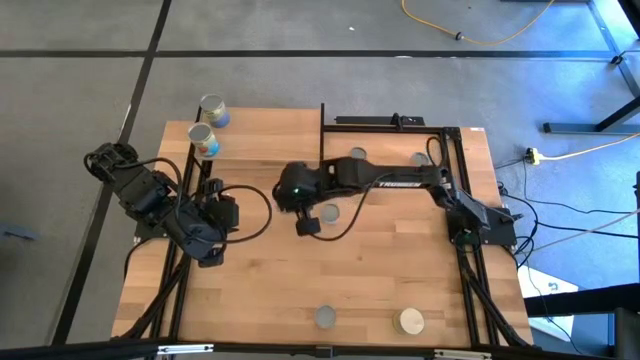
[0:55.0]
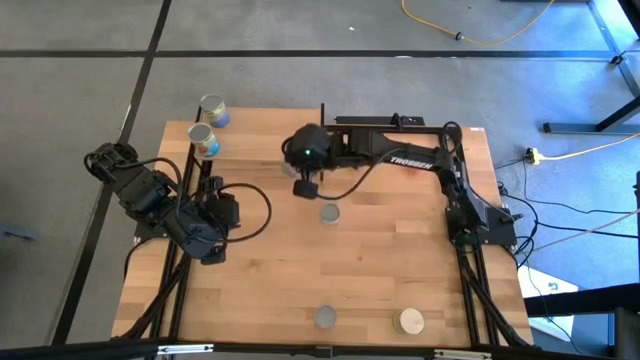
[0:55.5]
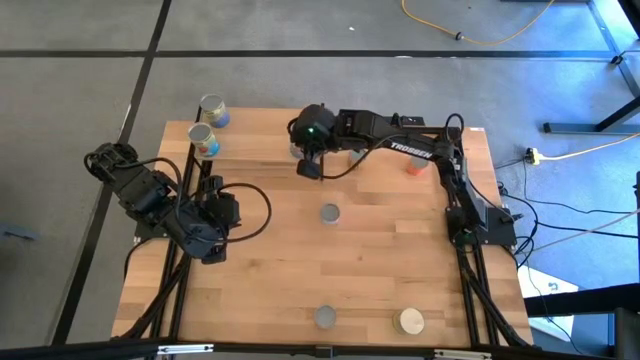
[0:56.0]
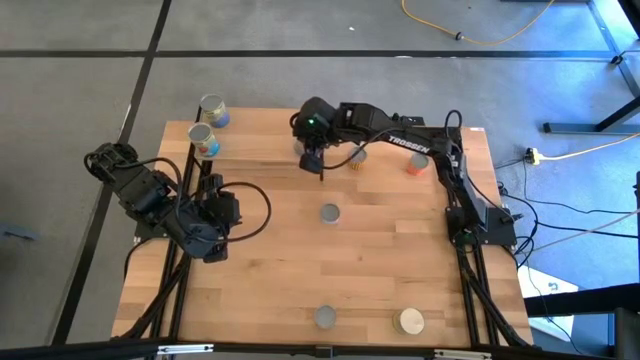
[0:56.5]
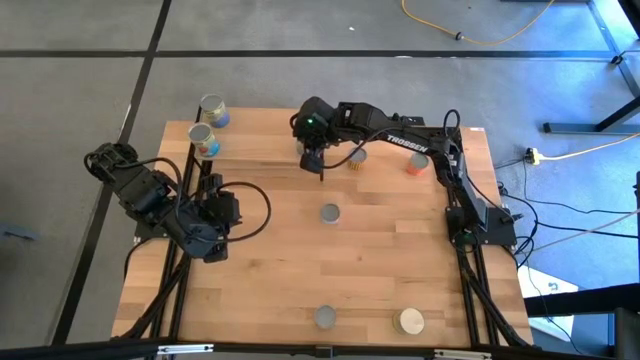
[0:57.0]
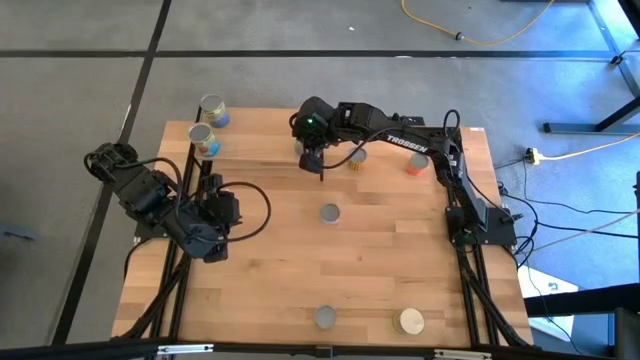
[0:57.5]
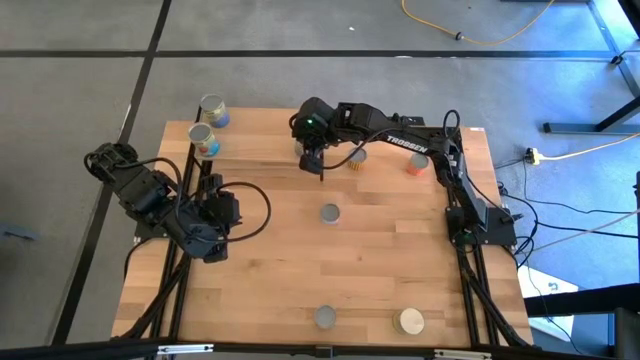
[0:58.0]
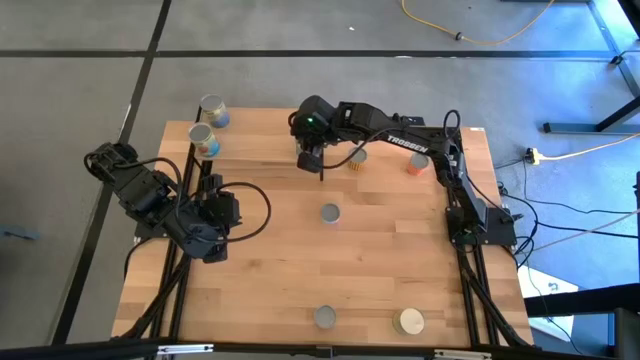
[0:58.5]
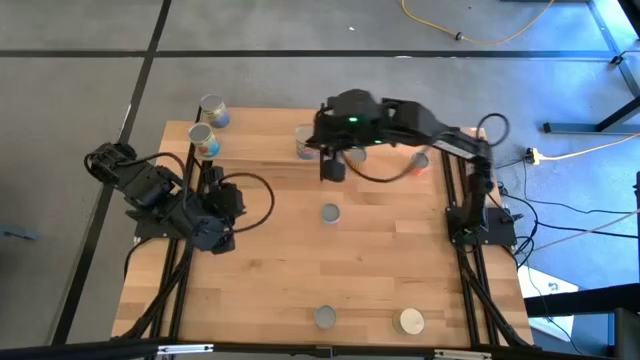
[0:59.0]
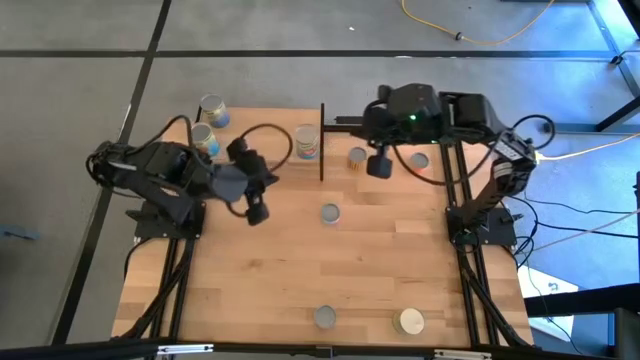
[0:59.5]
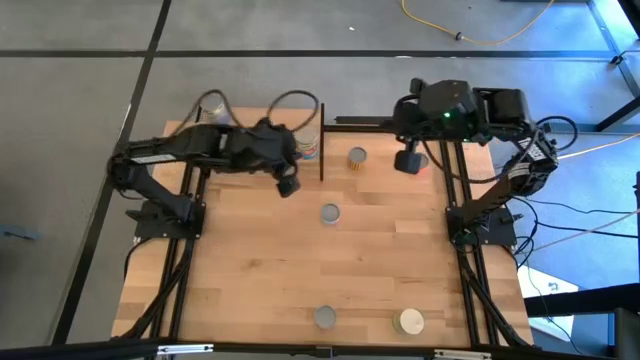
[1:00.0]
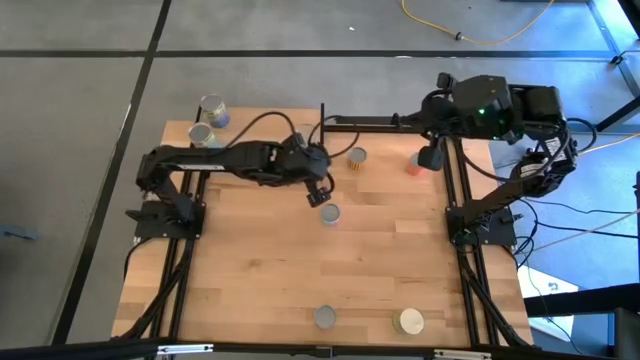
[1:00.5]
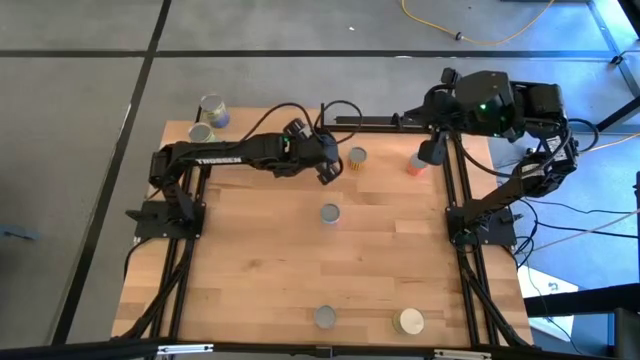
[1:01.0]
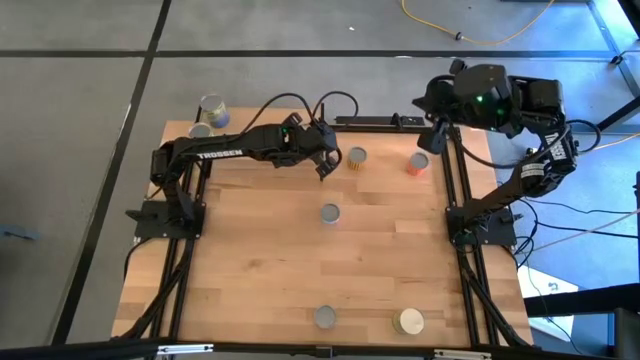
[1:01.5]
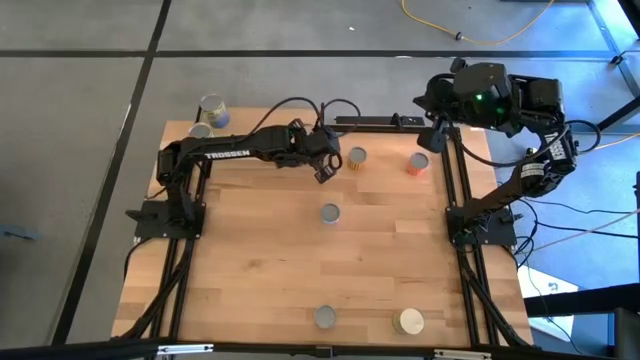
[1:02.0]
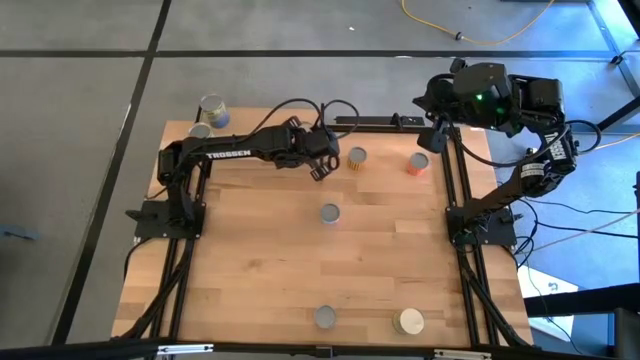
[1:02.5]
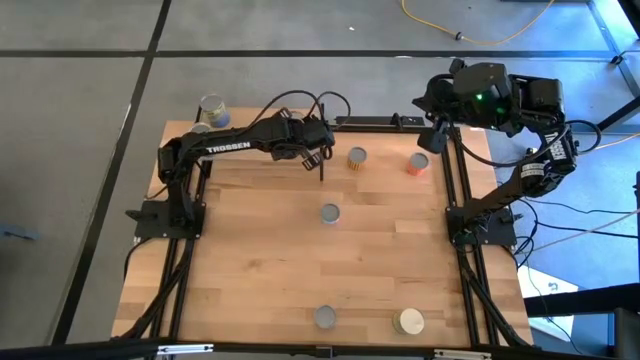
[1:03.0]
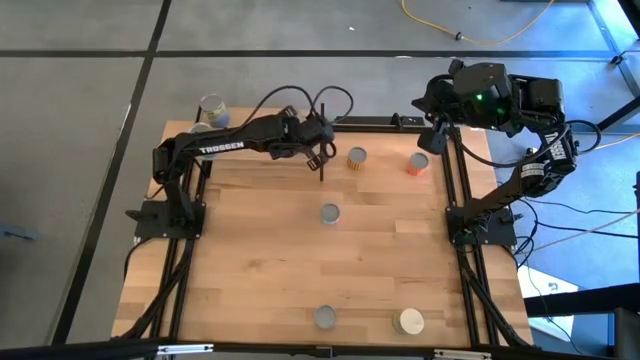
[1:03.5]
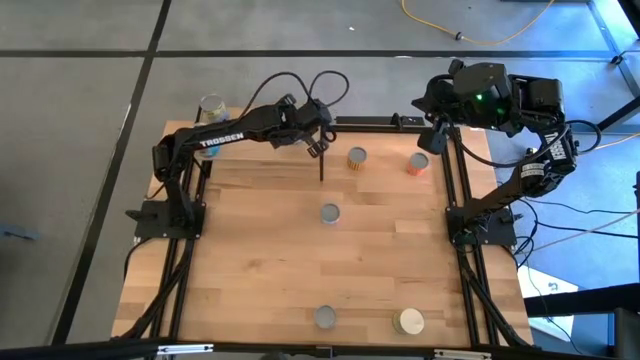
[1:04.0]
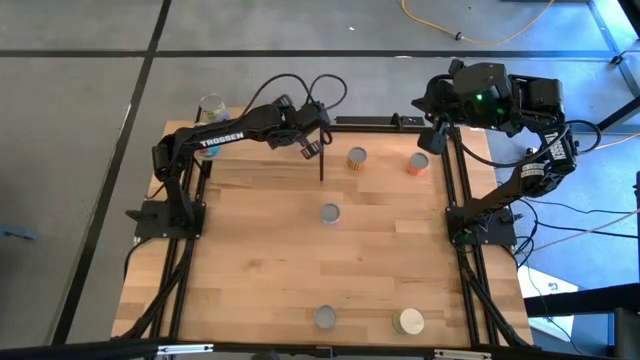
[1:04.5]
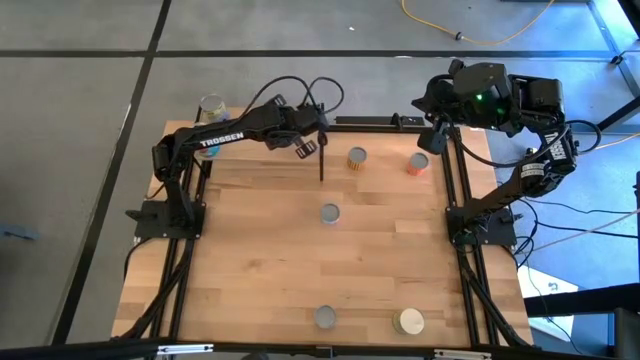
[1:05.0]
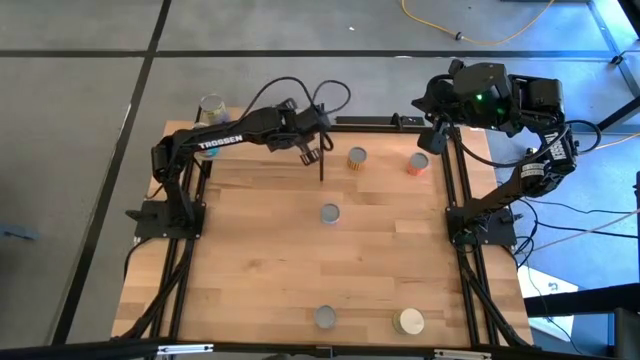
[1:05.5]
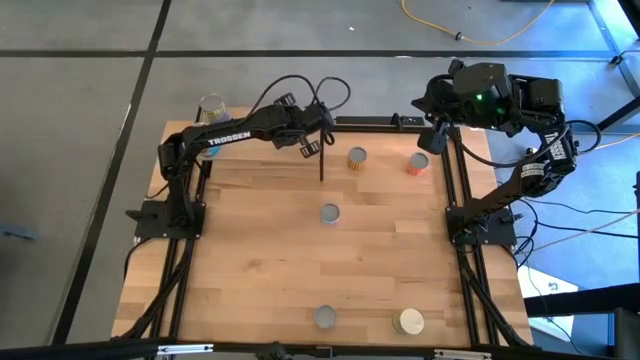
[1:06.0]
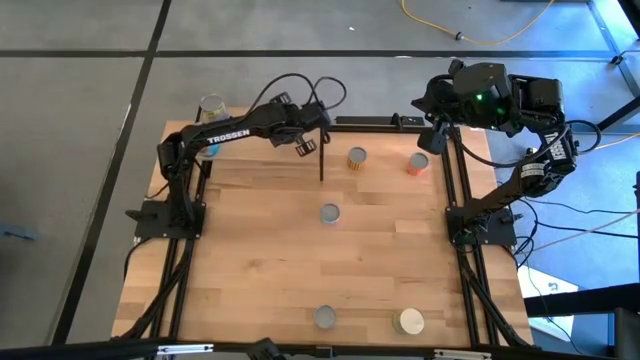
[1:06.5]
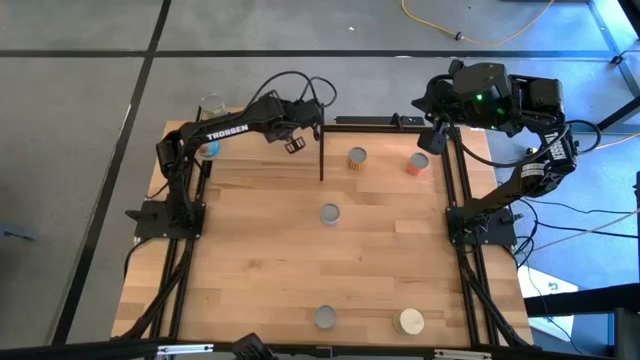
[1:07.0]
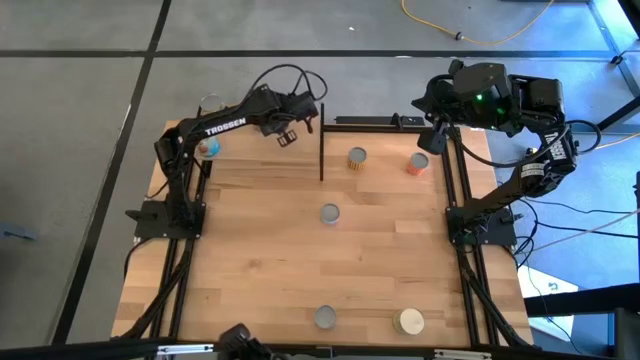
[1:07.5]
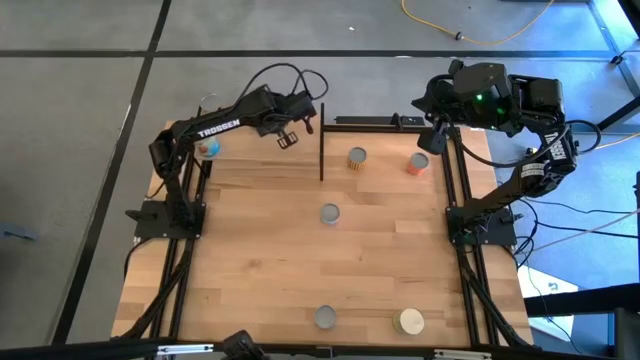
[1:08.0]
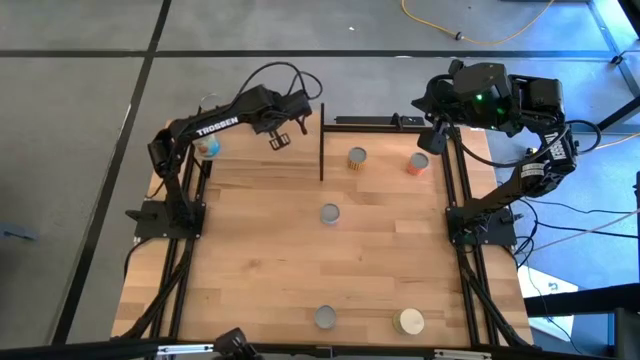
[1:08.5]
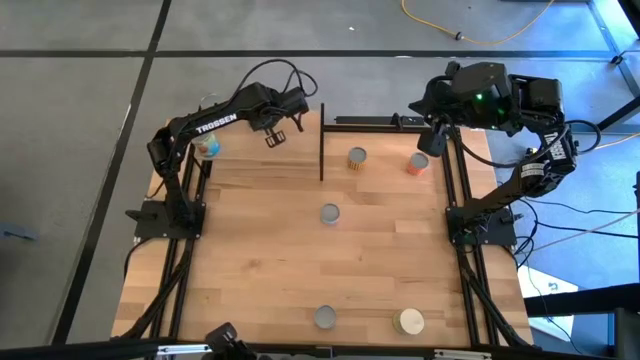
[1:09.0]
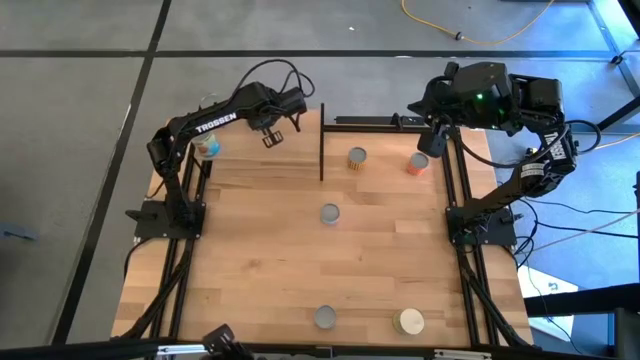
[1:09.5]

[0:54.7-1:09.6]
Task: Pick and place cans onto a shelf
Put the blue canned tomatoes on the shelf

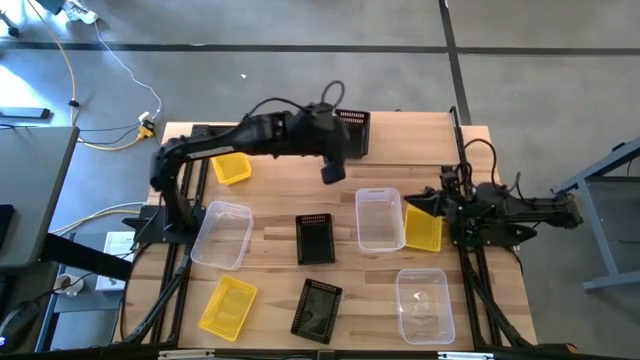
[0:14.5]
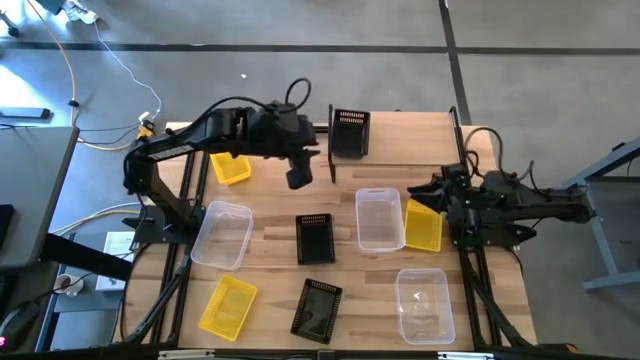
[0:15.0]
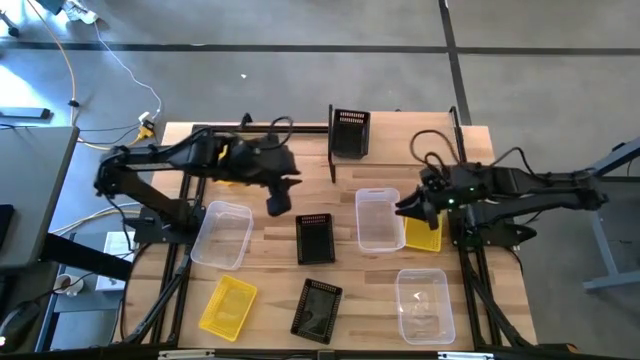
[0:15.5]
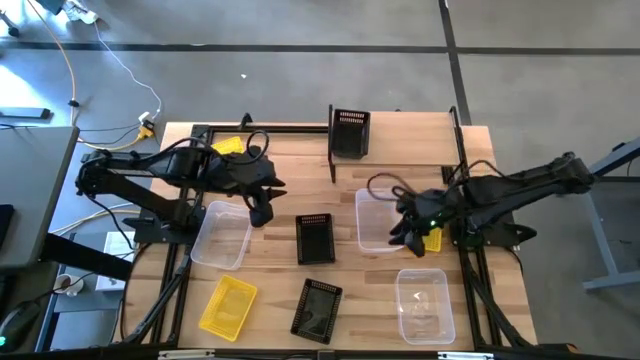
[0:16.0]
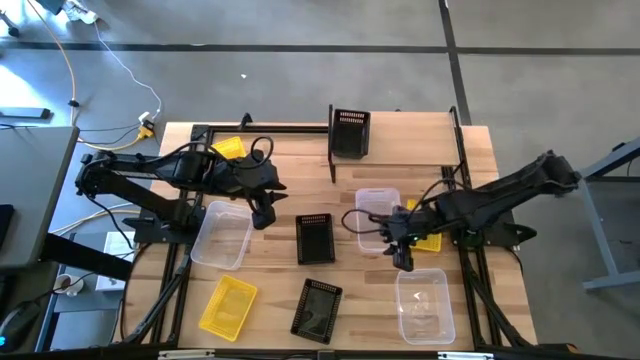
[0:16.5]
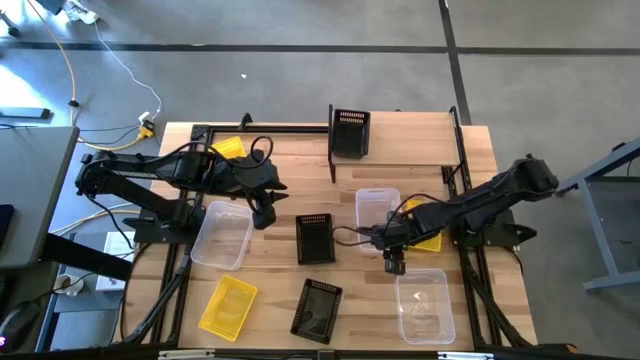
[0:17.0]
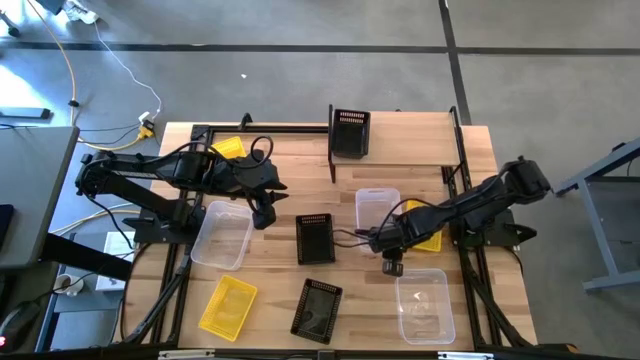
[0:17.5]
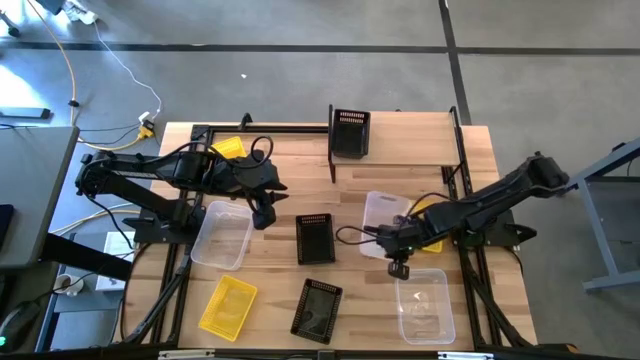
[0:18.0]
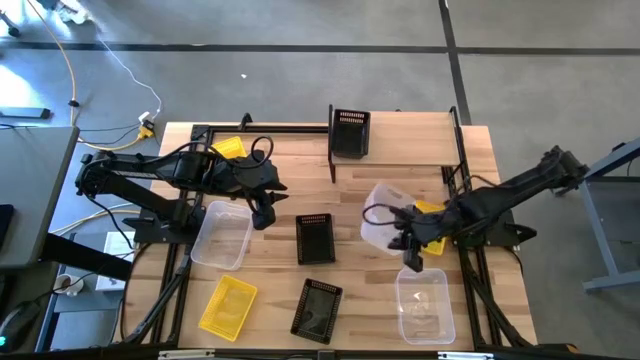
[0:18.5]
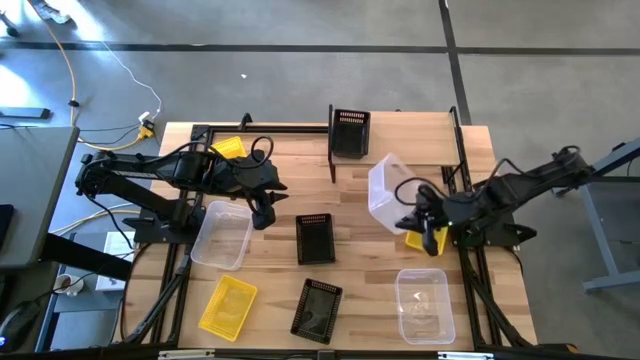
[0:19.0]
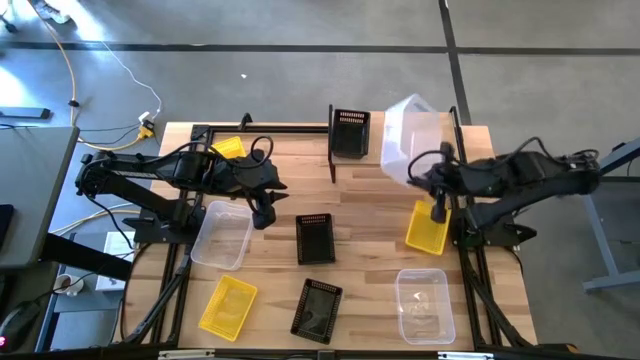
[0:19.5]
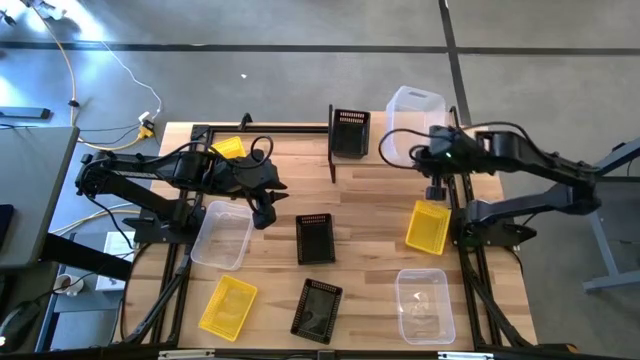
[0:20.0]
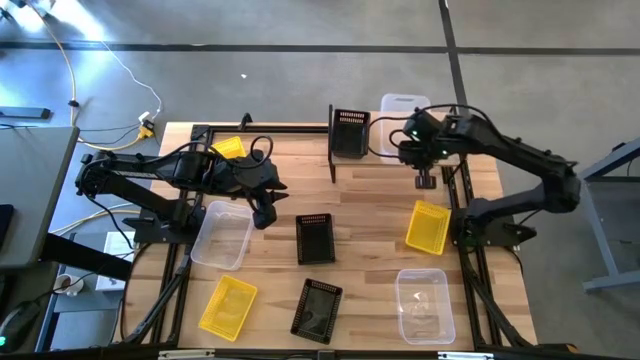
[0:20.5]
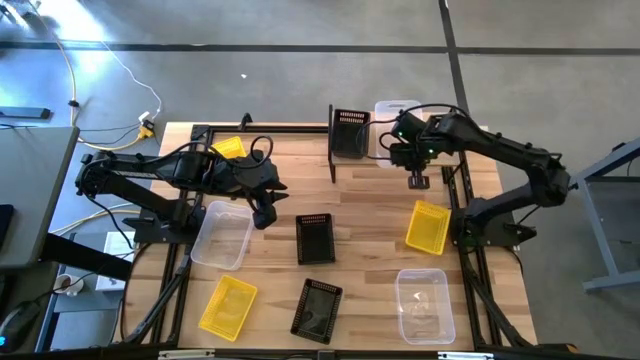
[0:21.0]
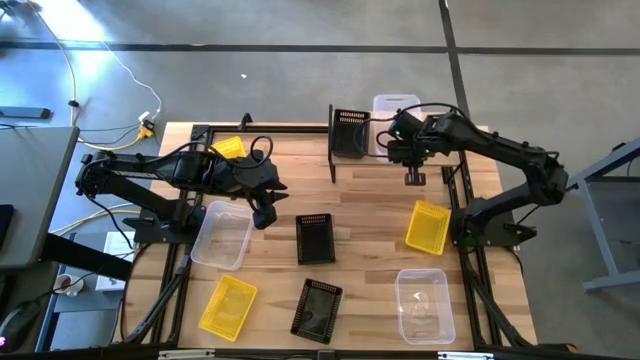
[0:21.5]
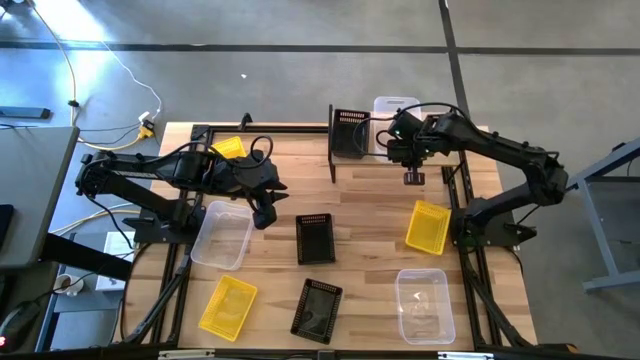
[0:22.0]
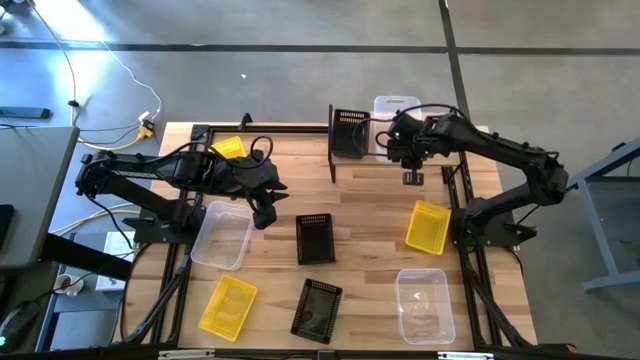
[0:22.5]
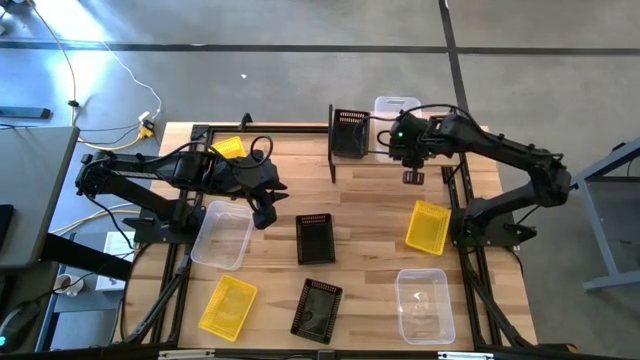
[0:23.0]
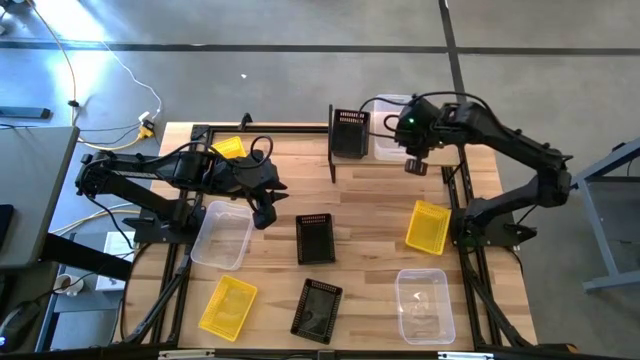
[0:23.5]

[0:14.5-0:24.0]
Task: Stack baskets on shelf by color
Put the top right transparent bin on the shelf
